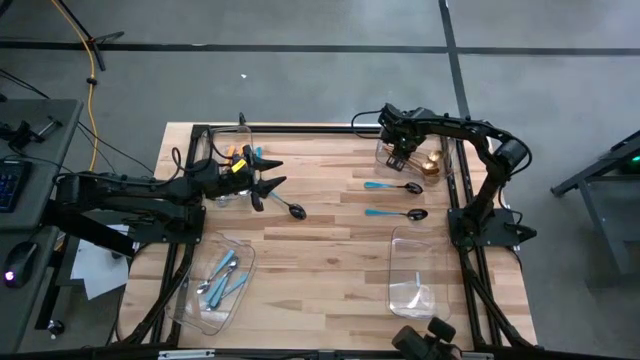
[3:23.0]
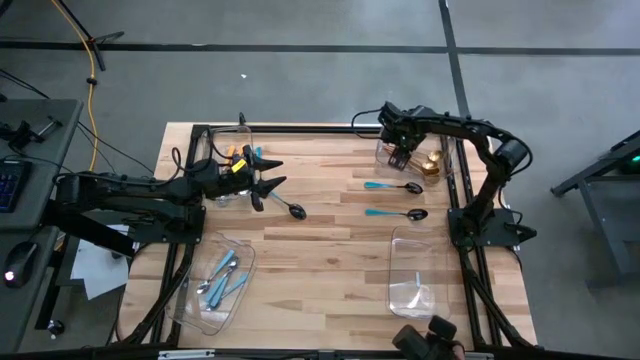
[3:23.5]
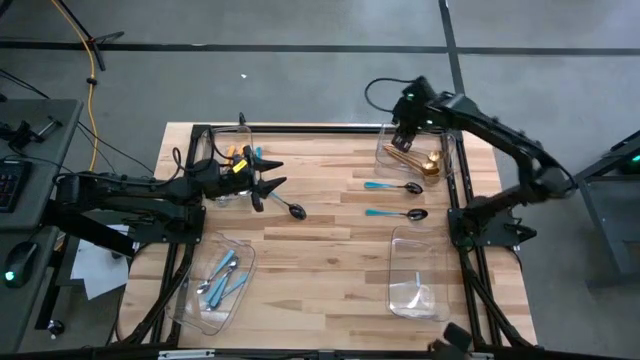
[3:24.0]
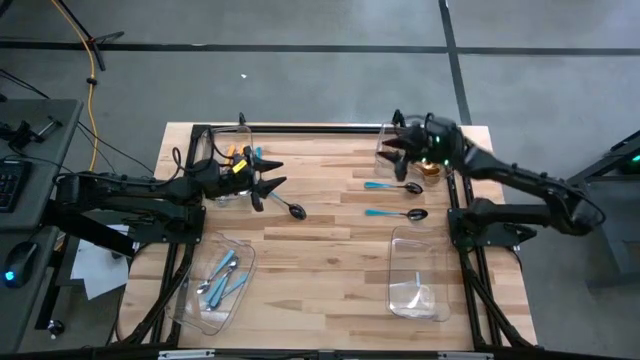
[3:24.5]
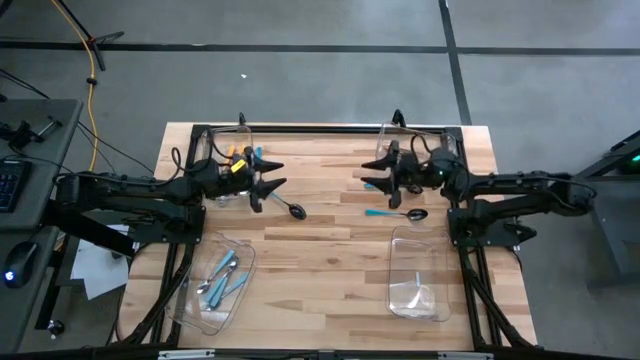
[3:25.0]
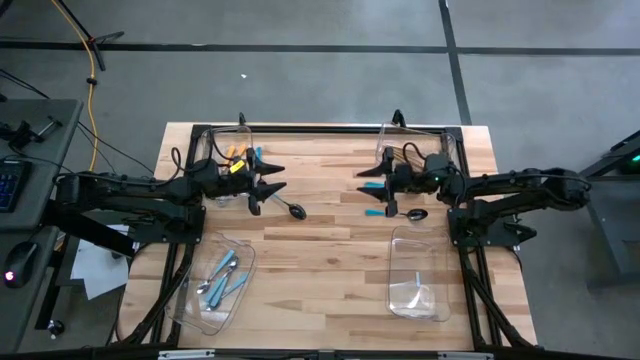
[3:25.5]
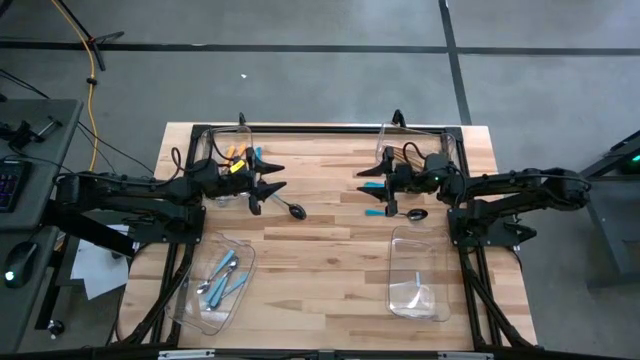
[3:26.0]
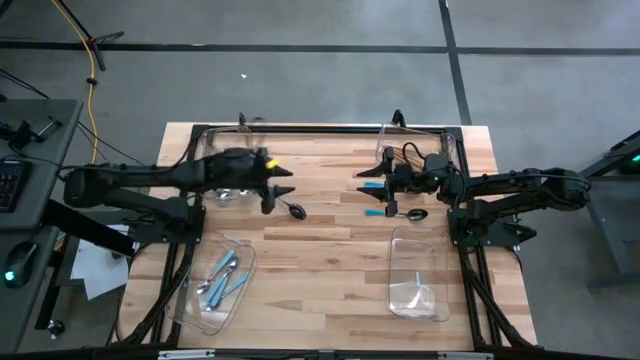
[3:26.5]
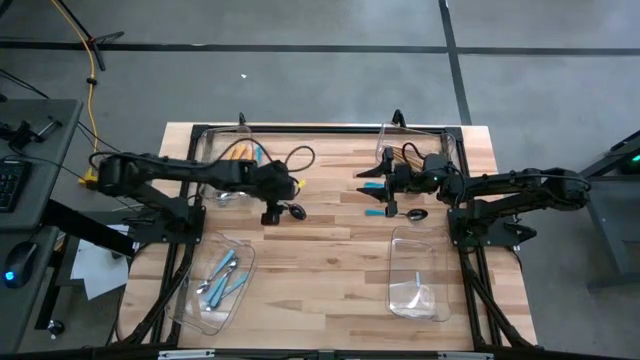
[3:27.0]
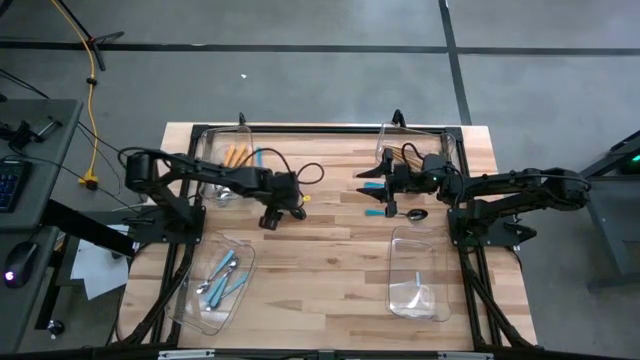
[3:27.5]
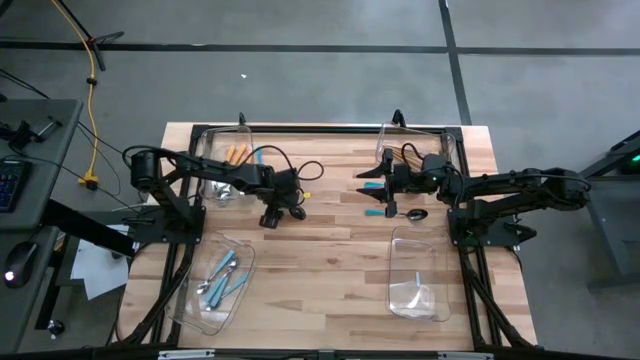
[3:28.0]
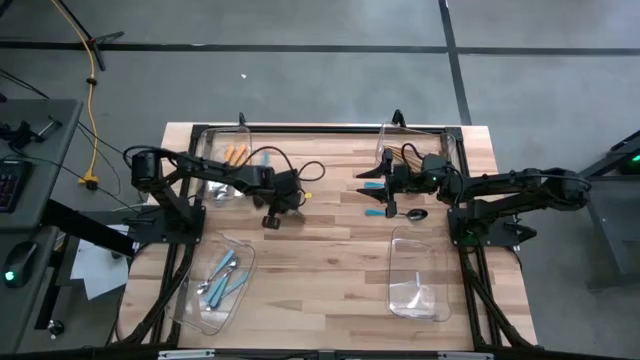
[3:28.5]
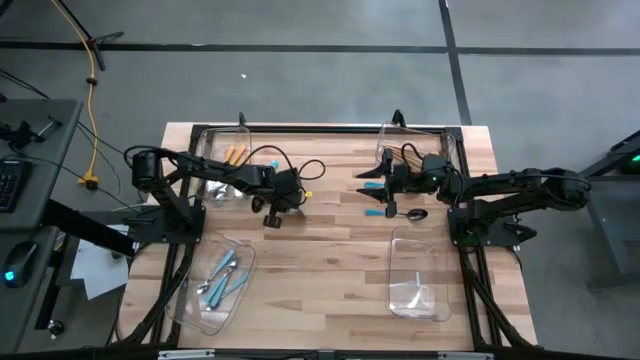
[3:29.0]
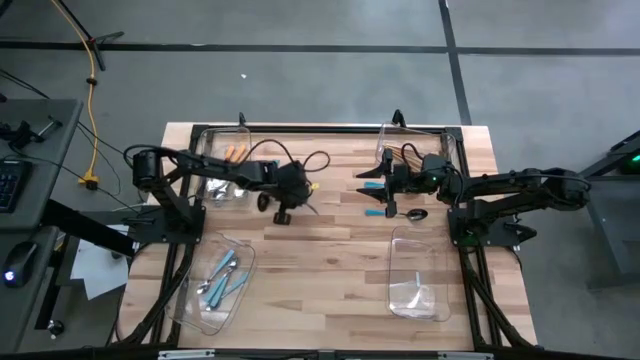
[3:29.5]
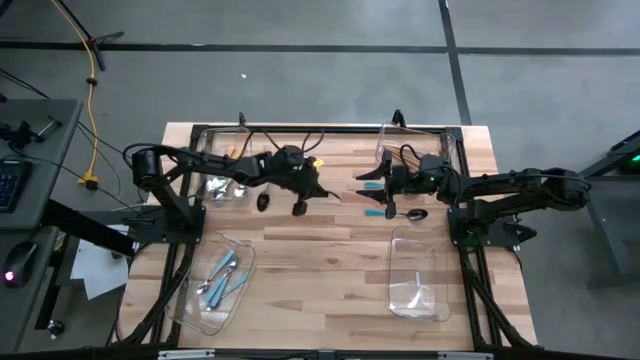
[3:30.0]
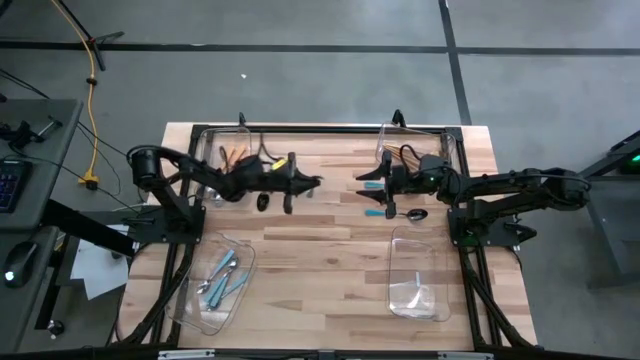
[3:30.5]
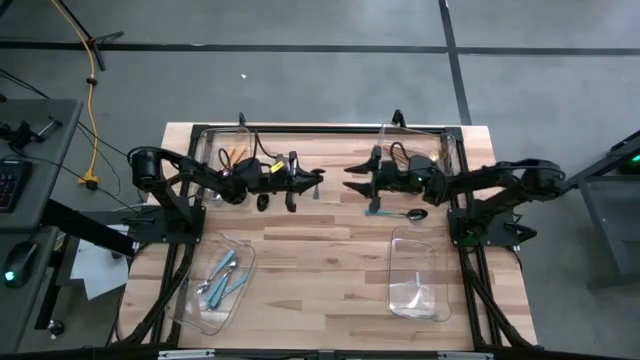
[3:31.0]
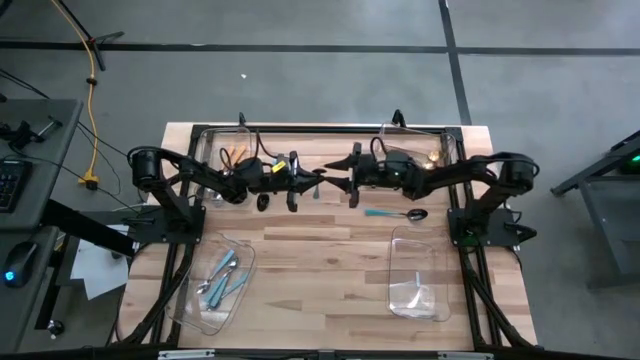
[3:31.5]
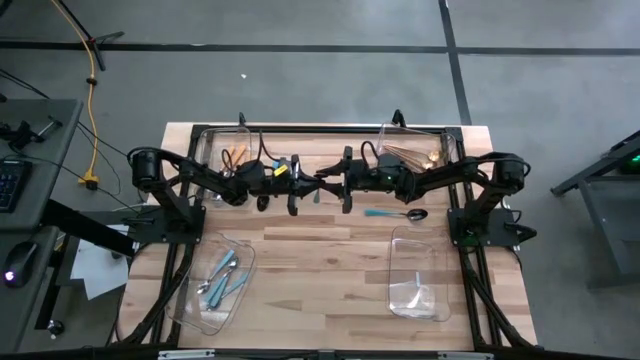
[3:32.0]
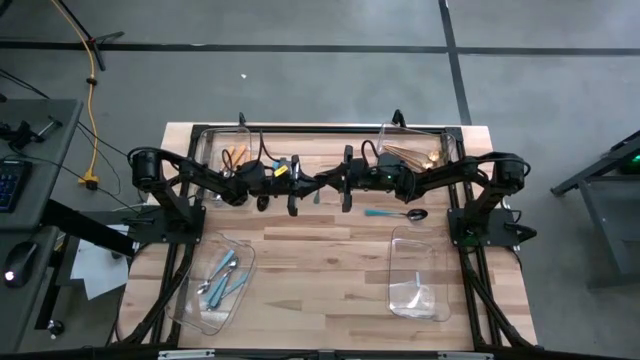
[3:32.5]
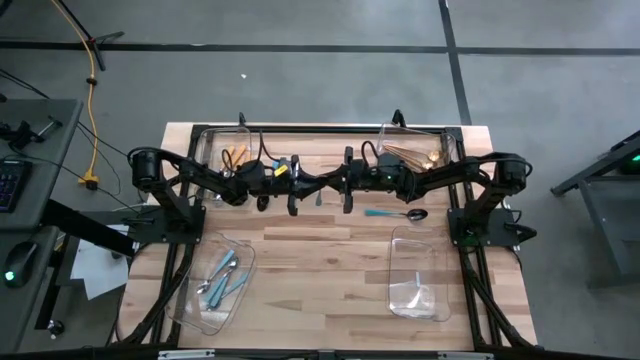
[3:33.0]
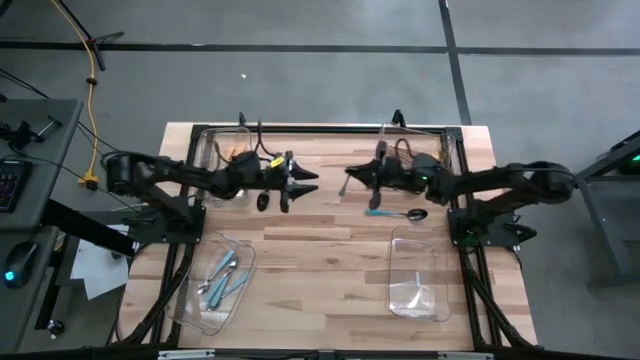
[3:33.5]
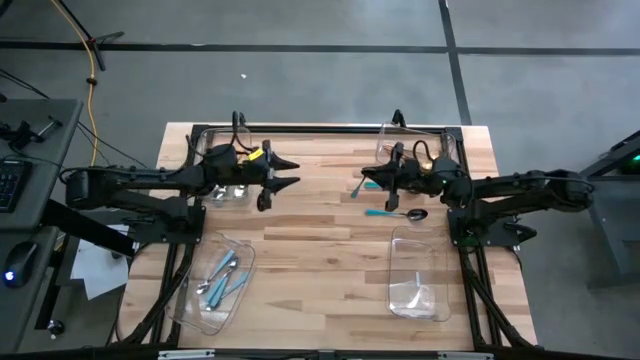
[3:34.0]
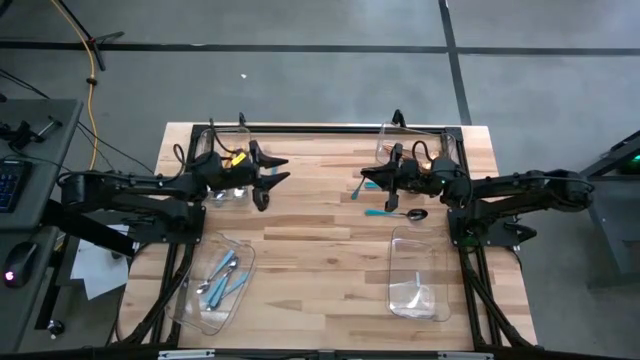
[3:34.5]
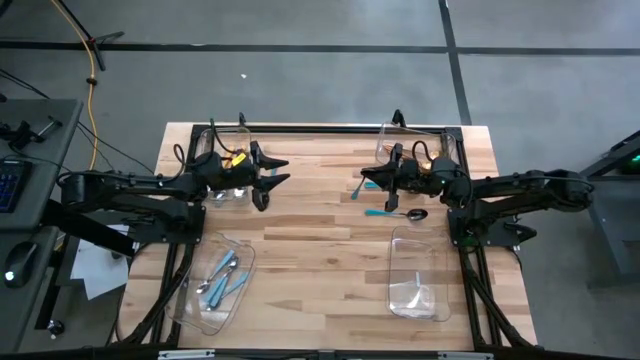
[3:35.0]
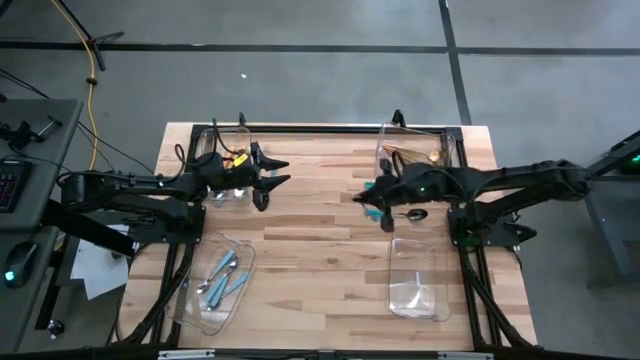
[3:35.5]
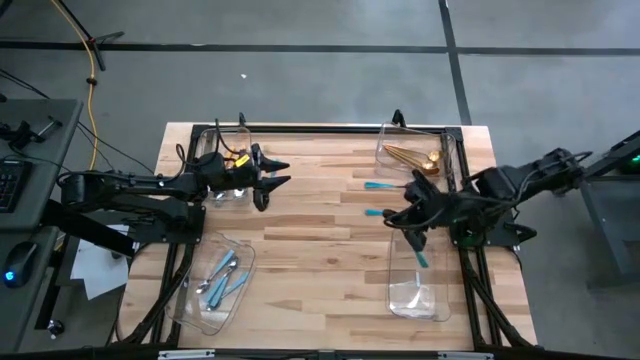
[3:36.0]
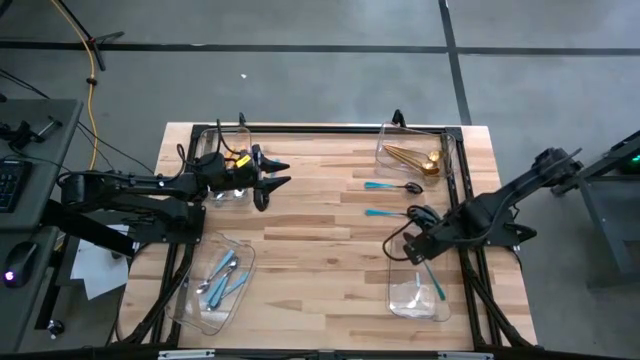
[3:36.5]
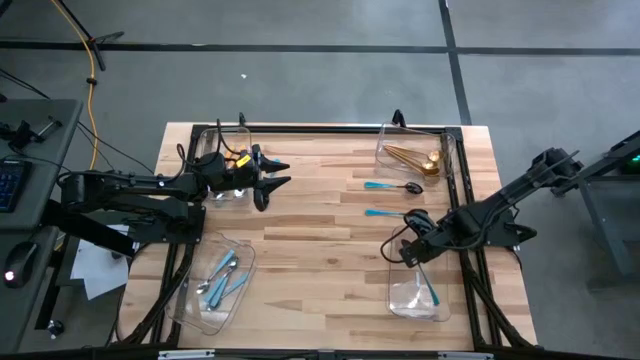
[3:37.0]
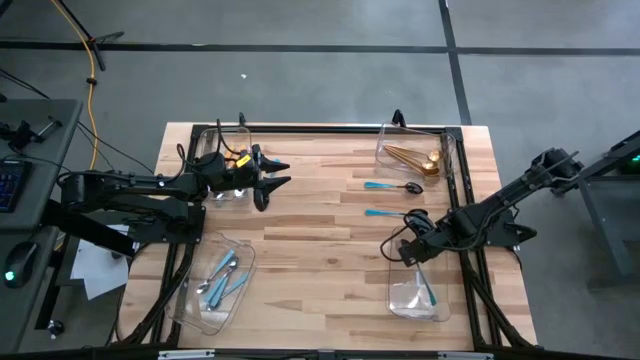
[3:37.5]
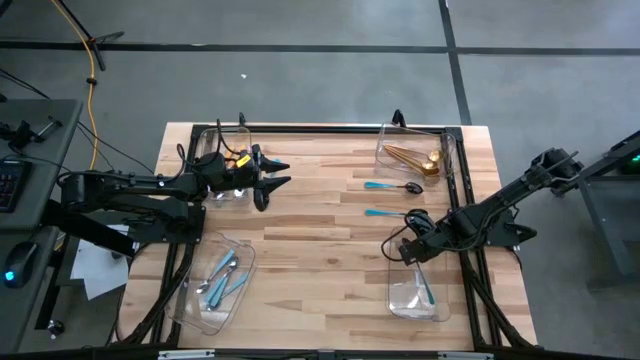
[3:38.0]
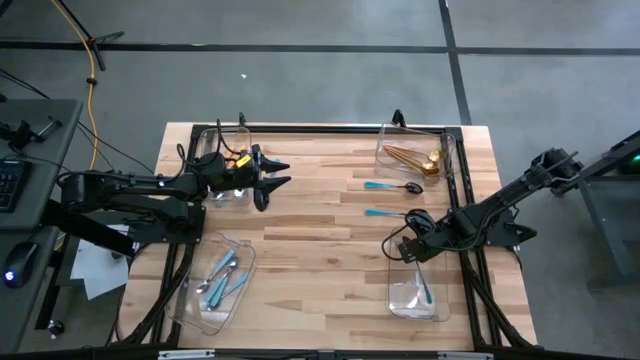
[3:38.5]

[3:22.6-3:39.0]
Task: Sort silverware by color (type)
Put the blue spoon into the bottom right transparent bin

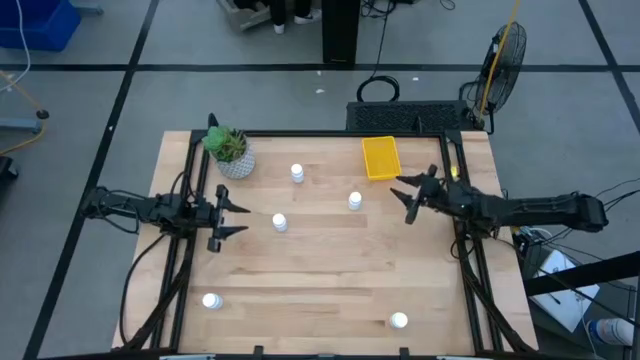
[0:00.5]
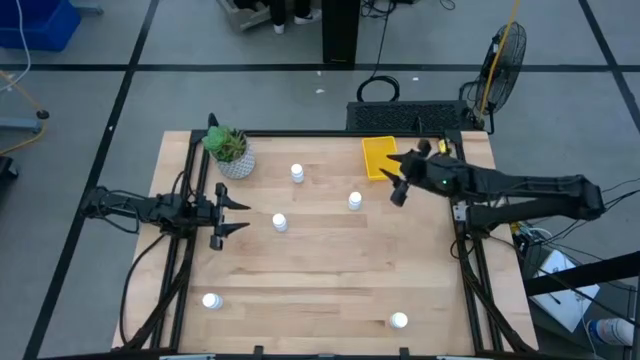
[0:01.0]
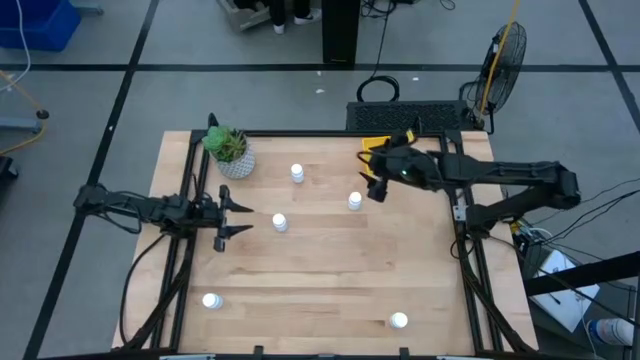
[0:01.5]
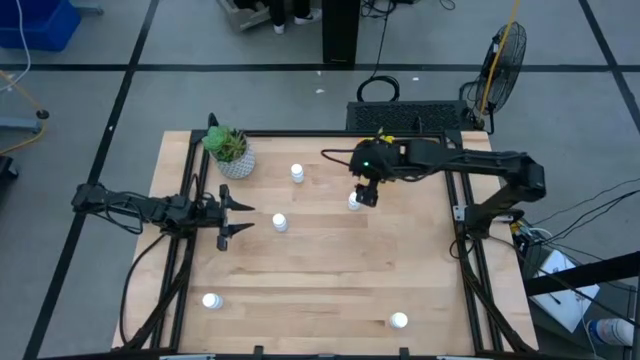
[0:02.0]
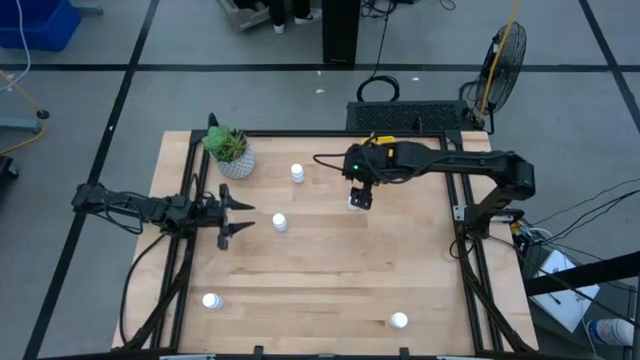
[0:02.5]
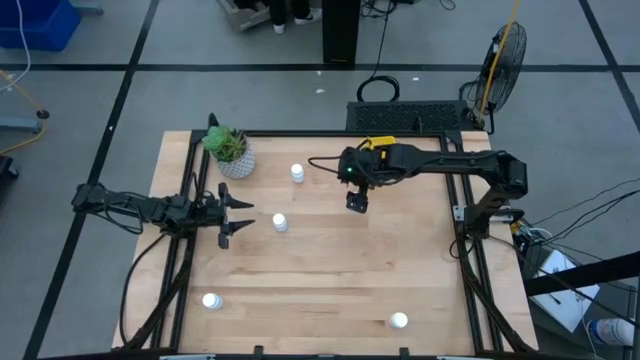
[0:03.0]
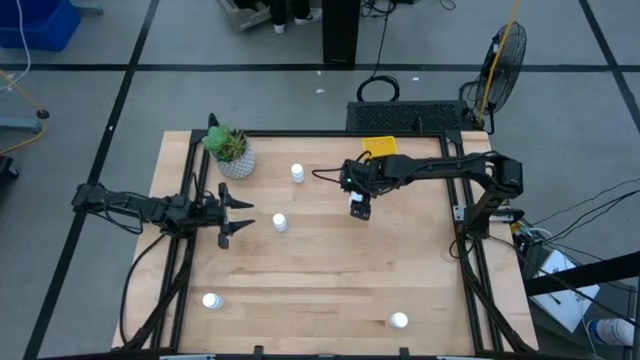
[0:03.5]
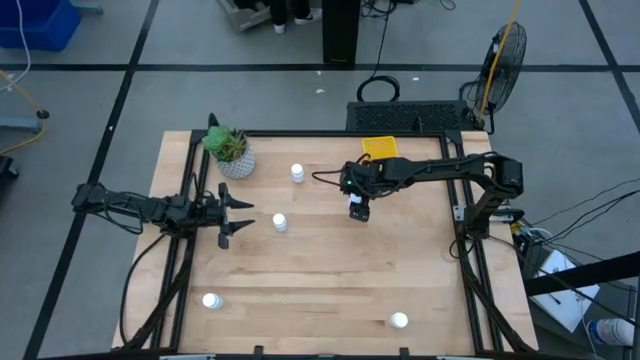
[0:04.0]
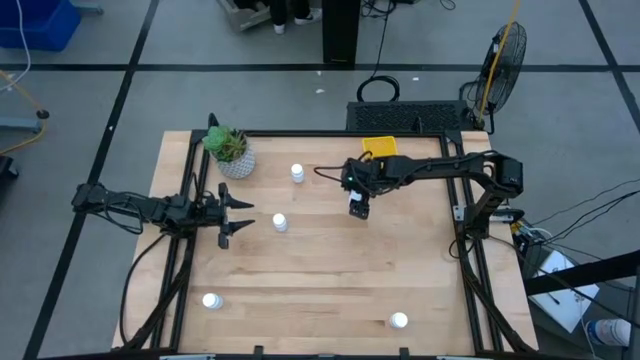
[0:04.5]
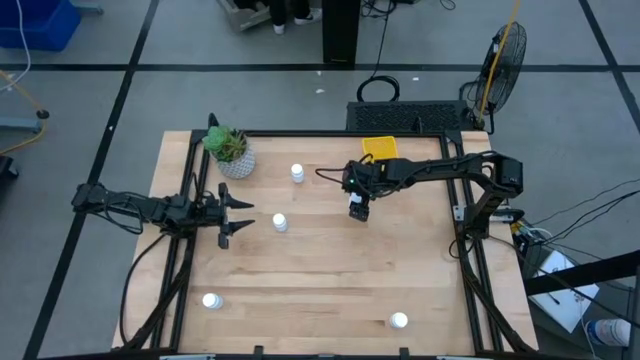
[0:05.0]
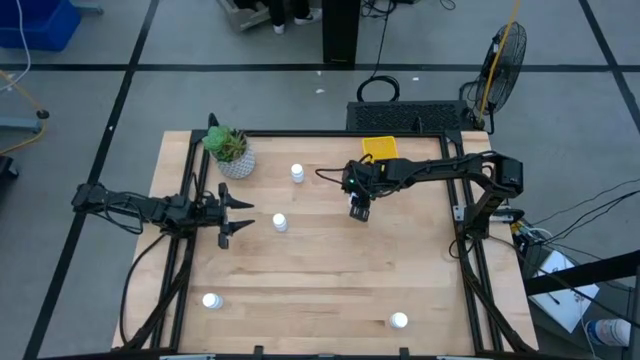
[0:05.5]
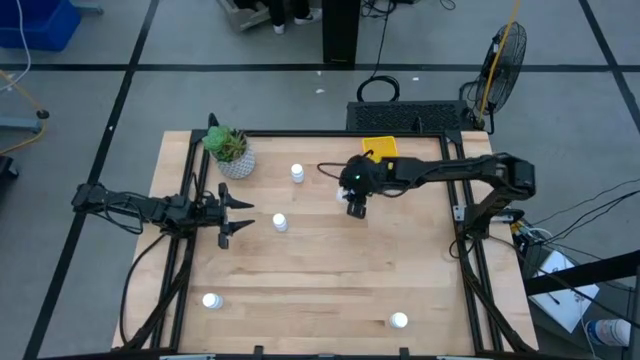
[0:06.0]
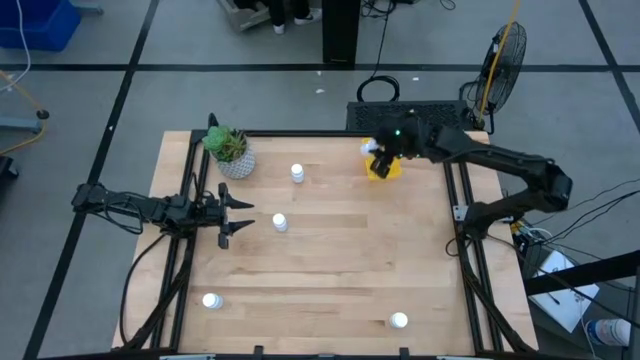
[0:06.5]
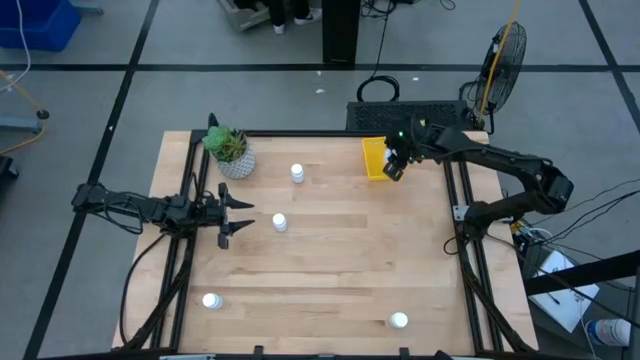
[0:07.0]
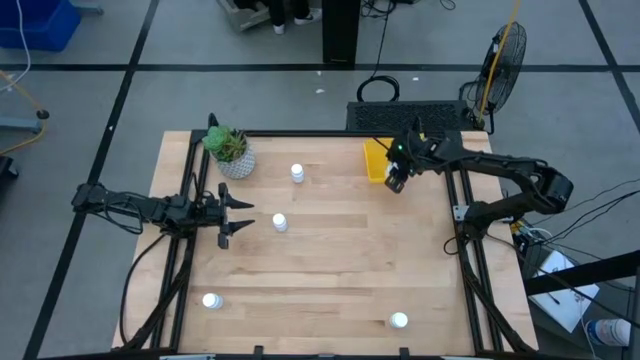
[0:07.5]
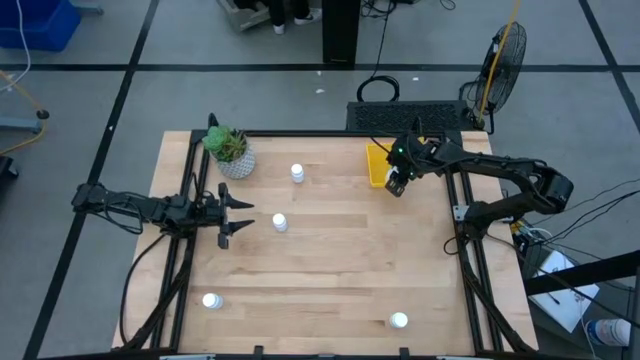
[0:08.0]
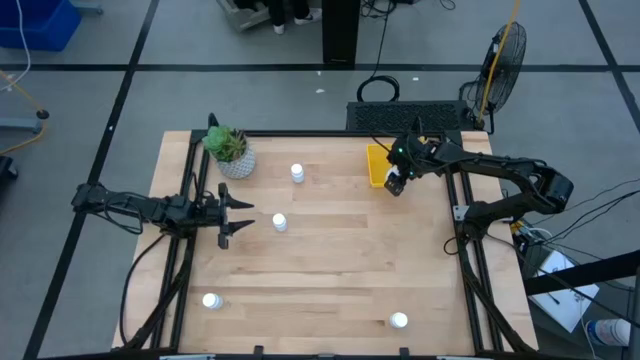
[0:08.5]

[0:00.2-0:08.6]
Task: Pick and place pill bottles into a basket
Put the white medicine bottle into the yellow bin
